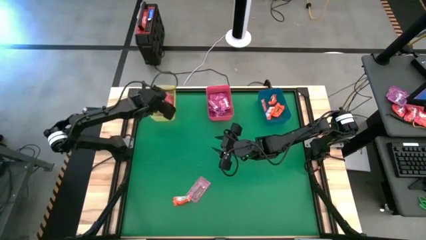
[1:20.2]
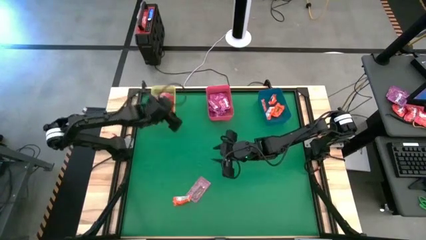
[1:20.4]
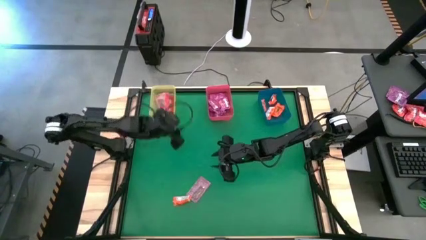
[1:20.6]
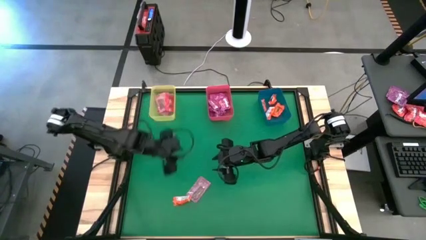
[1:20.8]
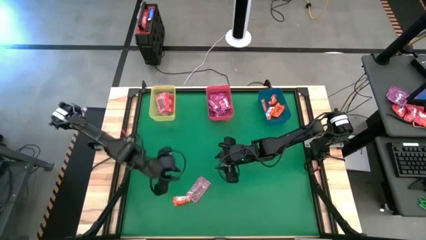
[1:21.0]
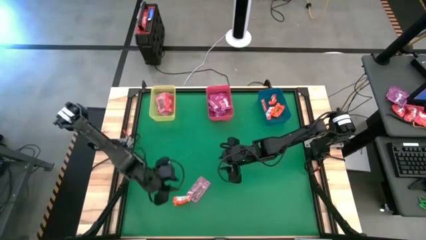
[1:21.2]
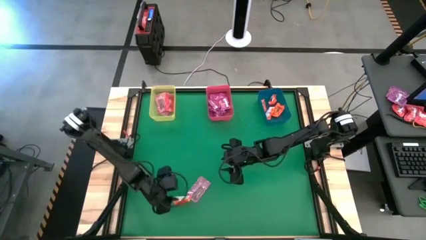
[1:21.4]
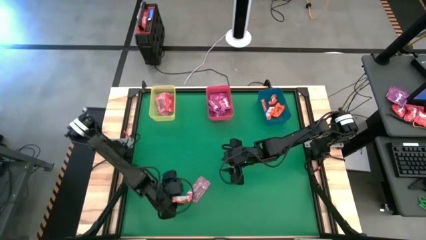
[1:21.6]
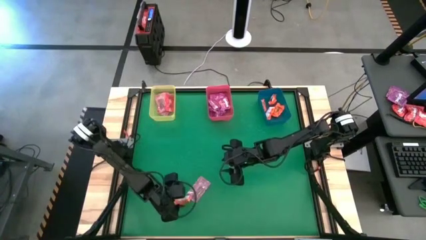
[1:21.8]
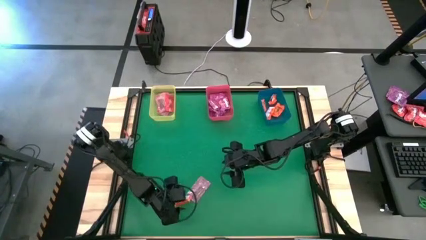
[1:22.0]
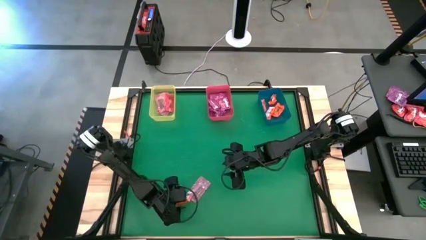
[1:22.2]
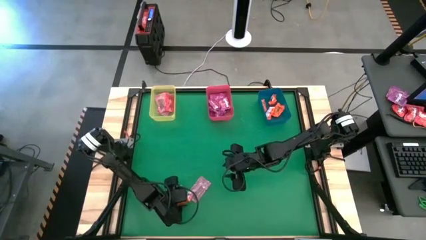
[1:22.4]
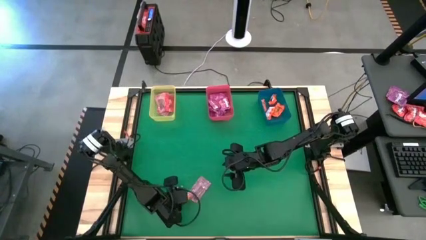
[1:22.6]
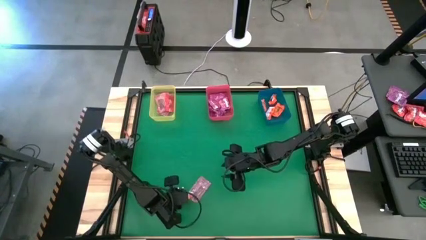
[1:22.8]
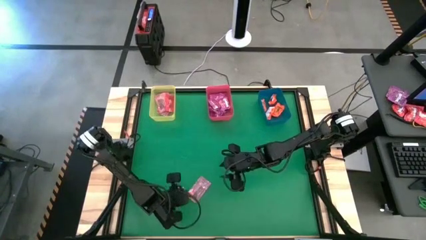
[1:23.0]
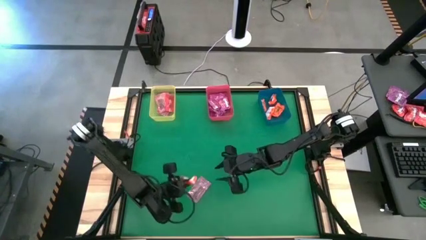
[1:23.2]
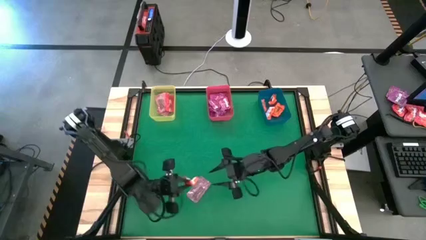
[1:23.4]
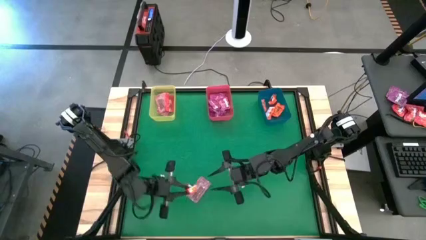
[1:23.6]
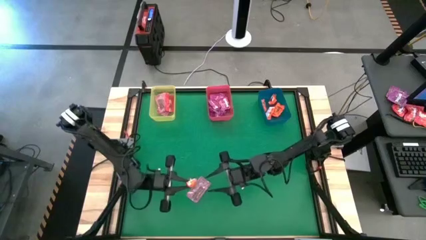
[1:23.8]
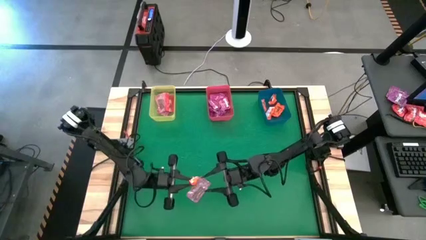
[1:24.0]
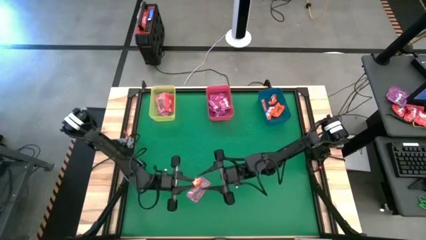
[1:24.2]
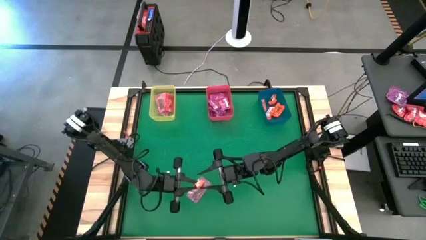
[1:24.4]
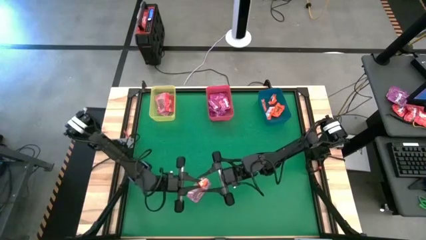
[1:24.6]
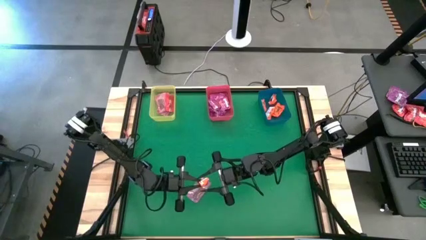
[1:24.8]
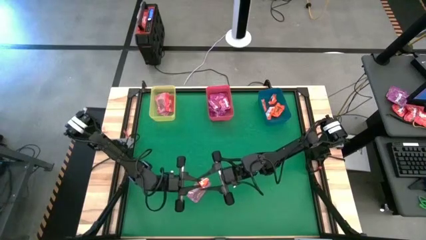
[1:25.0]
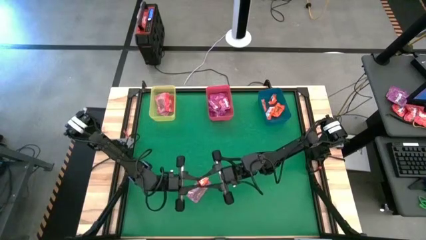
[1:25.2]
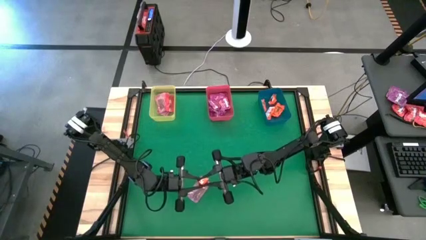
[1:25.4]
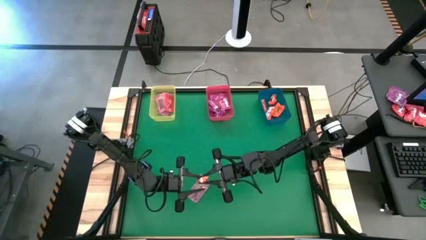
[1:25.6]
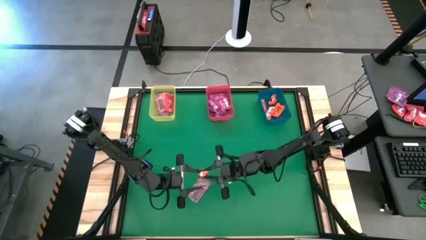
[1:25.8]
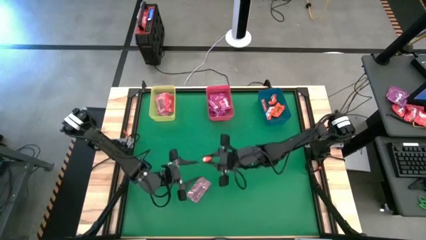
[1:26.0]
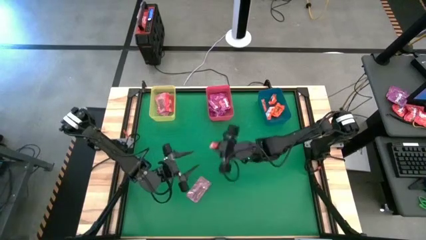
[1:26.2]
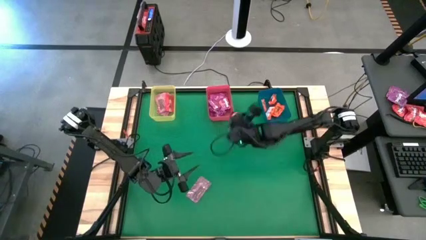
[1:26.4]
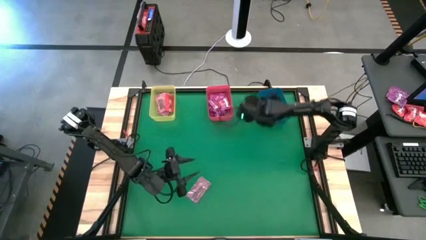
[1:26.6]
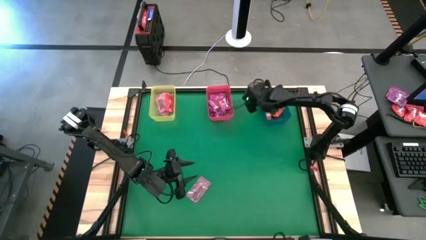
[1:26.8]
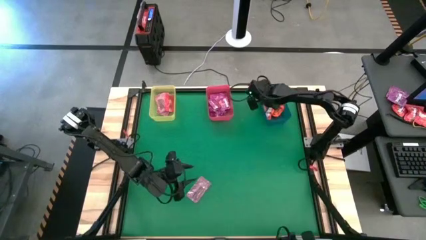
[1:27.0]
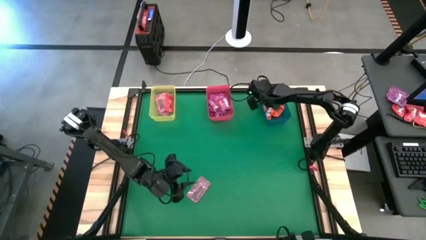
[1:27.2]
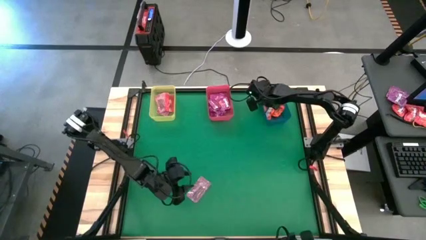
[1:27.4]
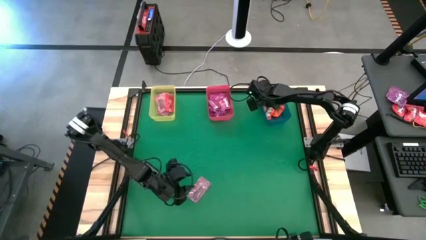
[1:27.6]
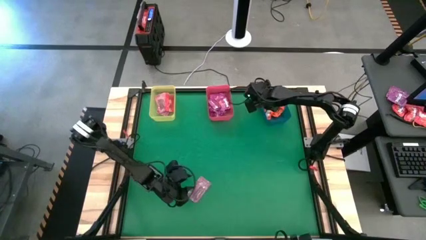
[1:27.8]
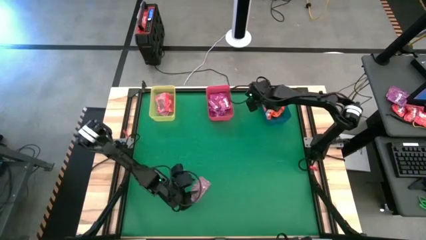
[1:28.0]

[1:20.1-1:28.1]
Task: Sort candy by brand, put in halloween buckets
Put the orange candy into the blue bin

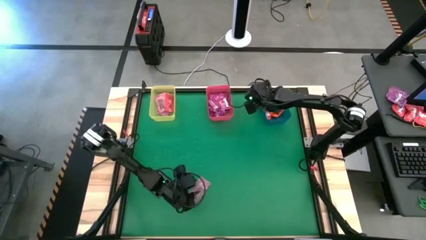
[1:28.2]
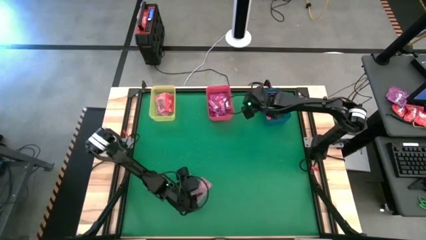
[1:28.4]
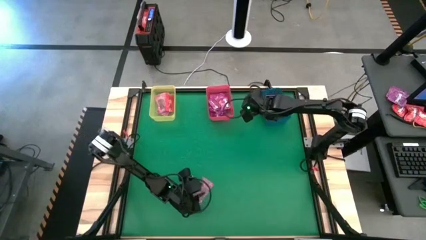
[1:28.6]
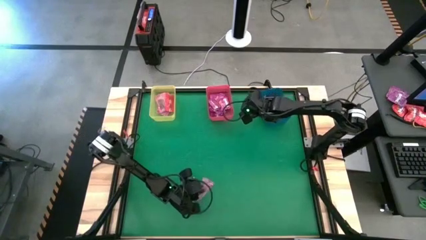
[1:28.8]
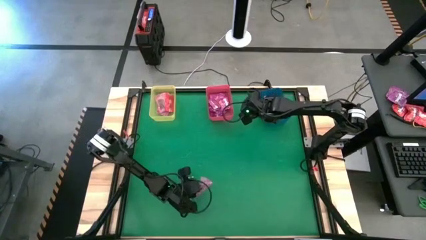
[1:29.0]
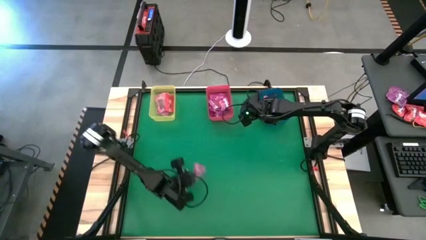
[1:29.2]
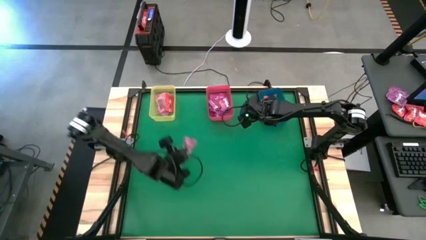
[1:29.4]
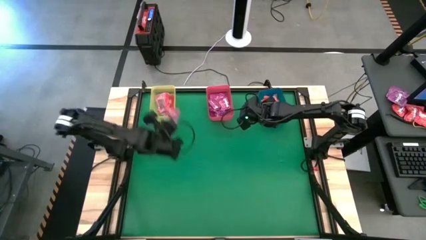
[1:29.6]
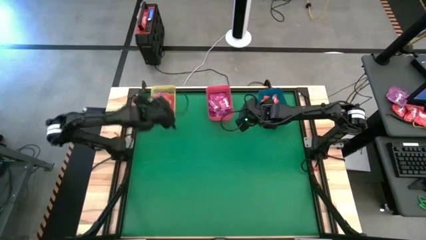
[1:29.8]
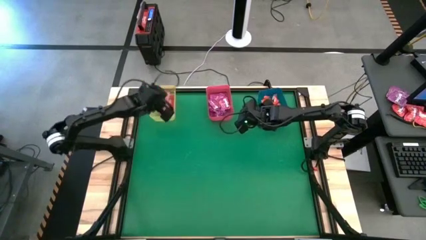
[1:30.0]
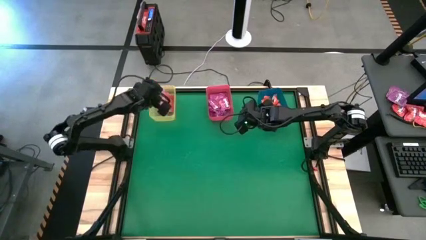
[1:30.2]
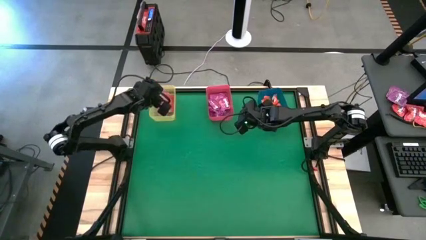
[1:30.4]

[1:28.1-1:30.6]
Put the pink candy into the yellow bin

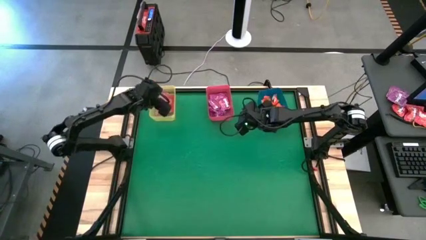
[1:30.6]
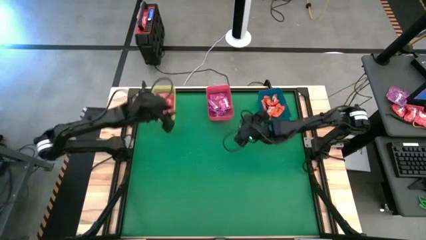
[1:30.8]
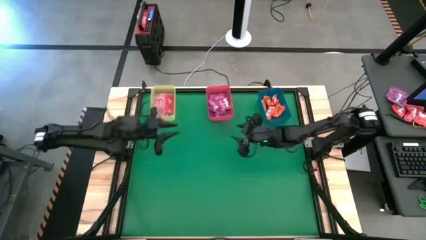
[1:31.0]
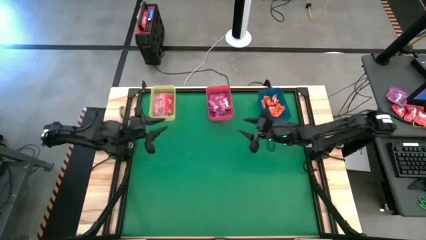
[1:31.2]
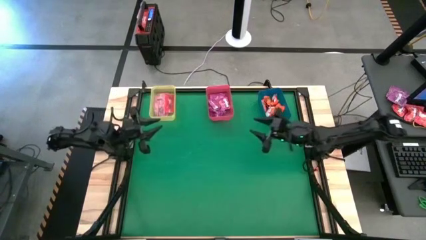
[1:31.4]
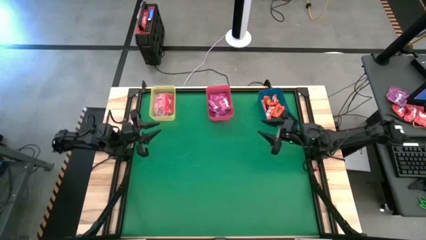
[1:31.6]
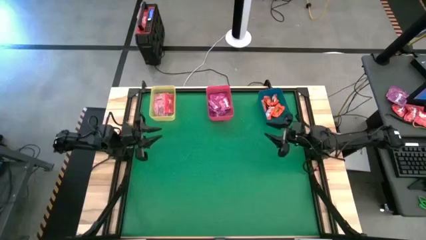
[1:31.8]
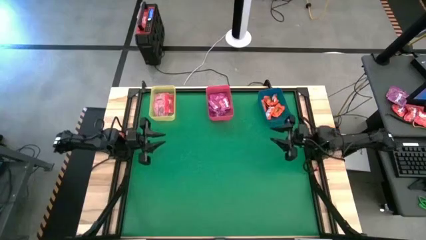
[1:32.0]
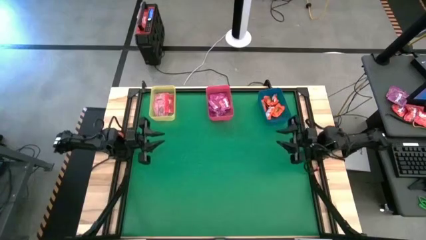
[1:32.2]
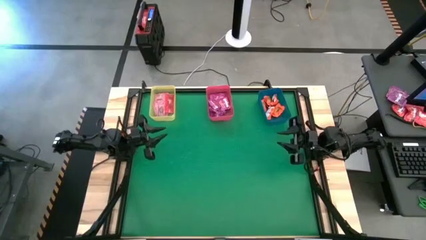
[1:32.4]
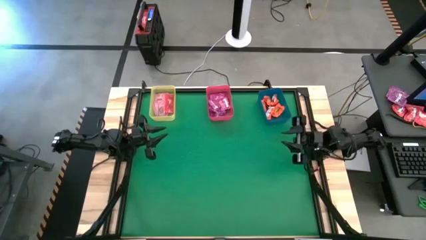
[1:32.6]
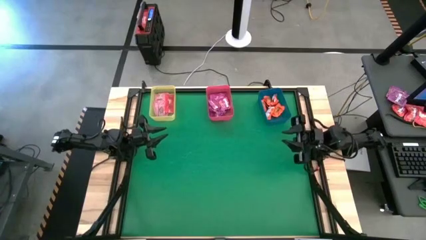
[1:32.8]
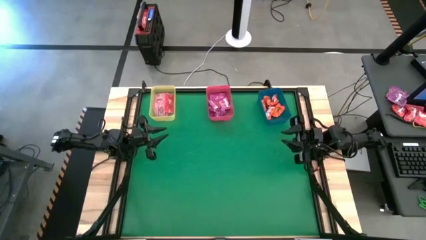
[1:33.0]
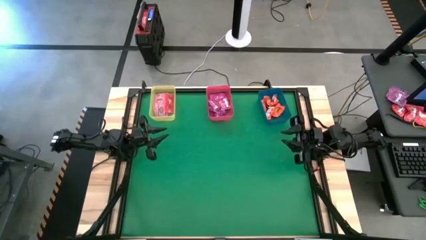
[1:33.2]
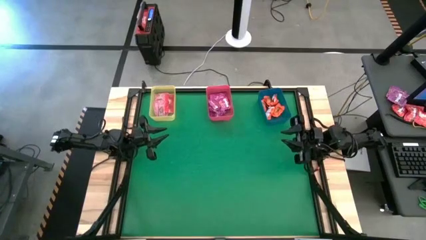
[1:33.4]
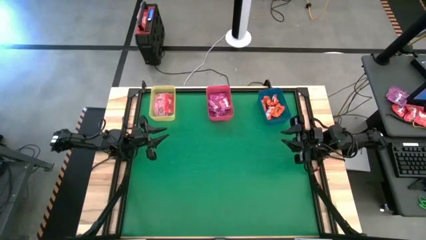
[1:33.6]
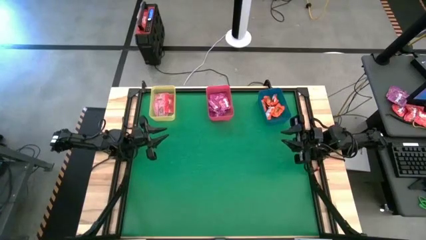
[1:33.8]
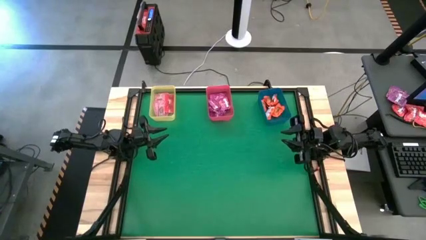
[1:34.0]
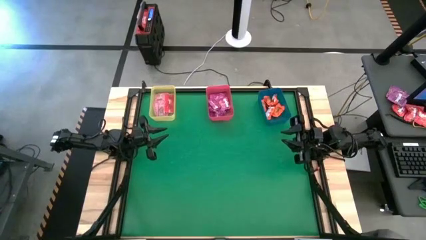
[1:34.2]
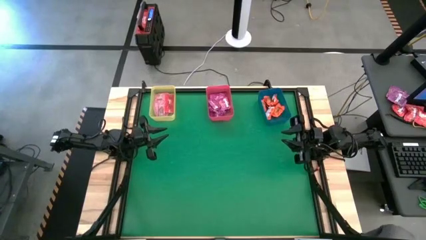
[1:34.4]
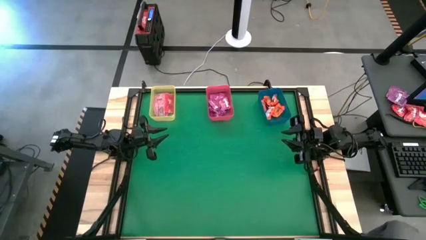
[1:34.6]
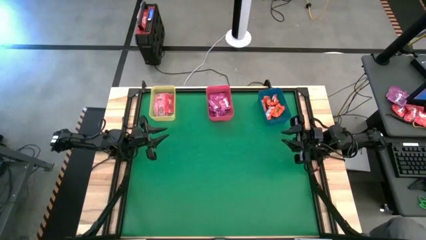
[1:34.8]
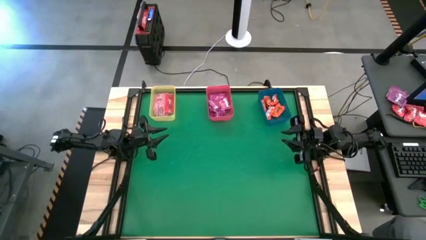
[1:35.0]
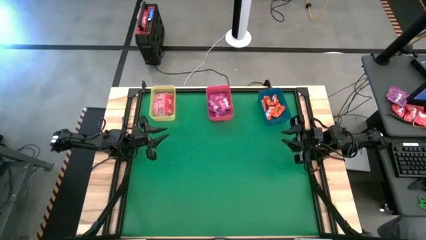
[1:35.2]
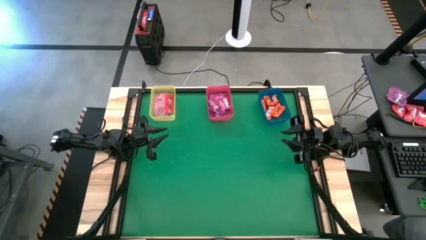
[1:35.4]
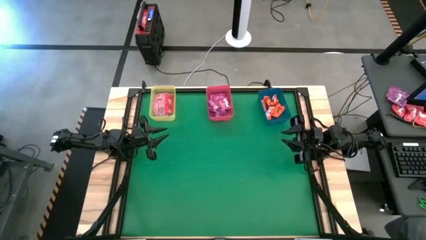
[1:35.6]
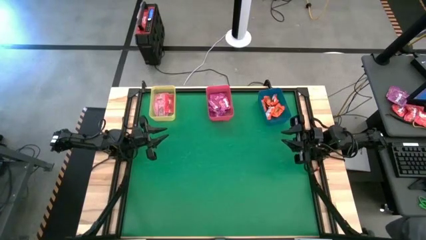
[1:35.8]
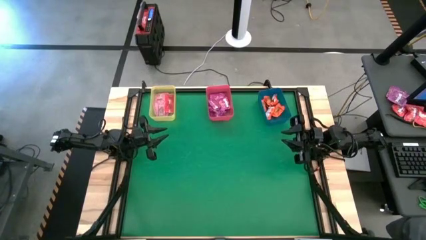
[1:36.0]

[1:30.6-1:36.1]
Return to Home Position

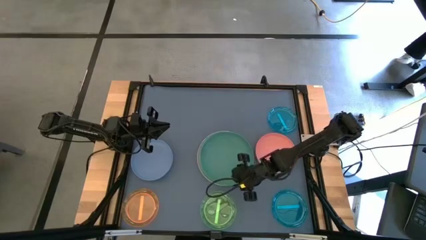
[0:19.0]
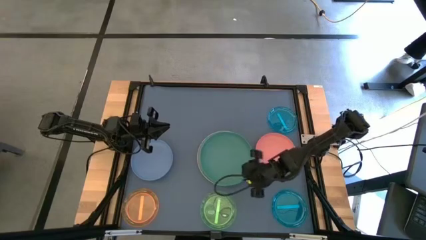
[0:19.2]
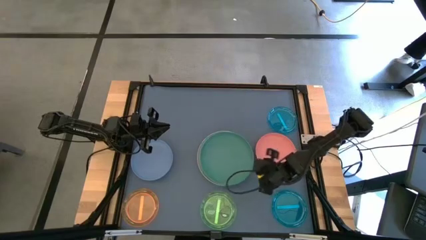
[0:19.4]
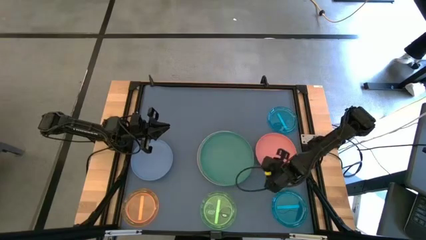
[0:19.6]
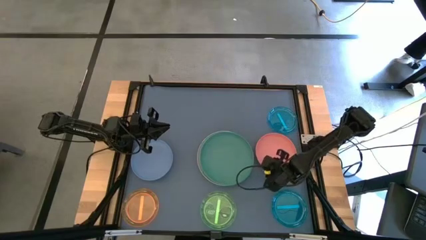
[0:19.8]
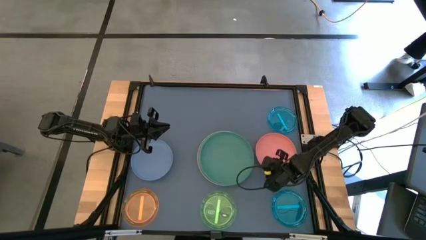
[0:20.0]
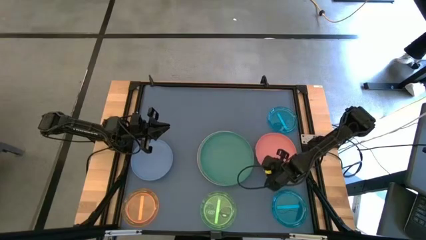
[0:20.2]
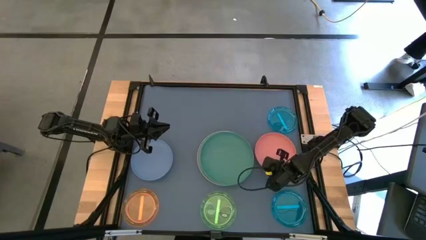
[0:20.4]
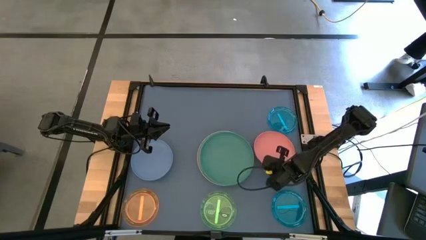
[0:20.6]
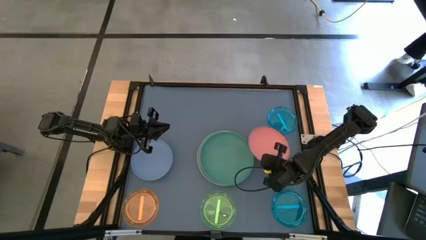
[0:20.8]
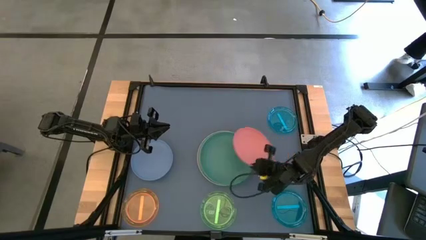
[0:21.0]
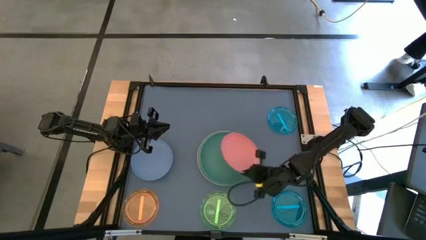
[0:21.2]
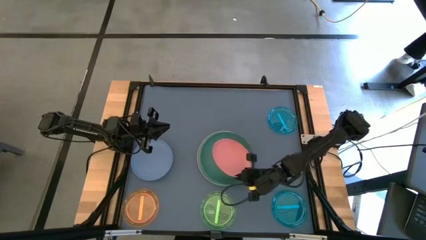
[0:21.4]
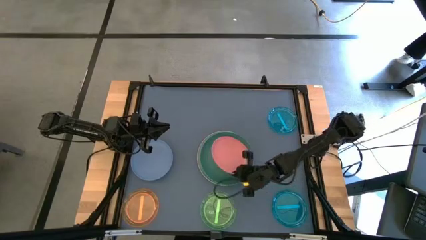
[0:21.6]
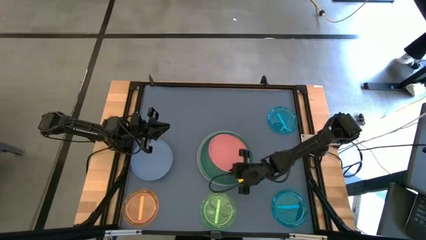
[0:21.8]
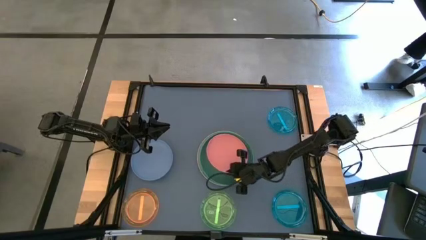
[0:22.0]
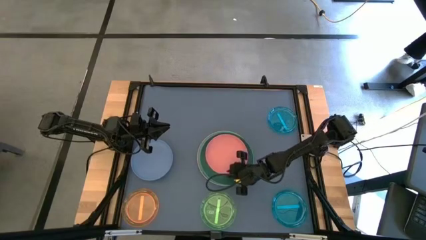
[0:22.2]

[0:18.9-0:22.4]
Task: Stack plastic plates
Stack the stacked green plate on top of the white plate
